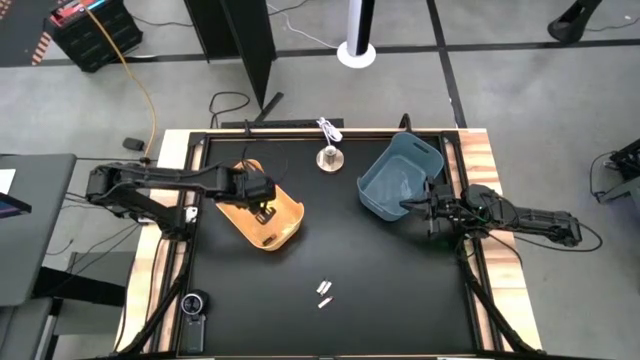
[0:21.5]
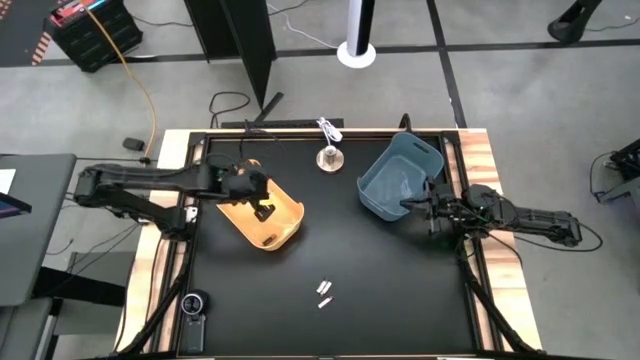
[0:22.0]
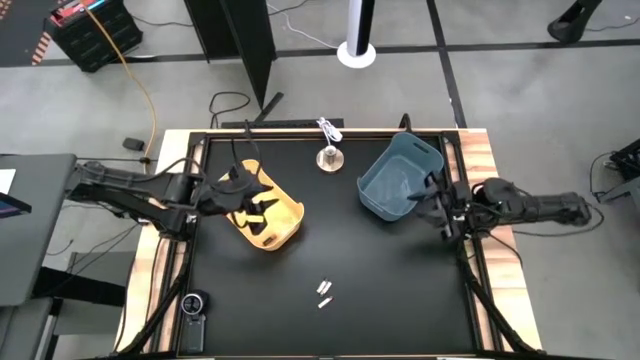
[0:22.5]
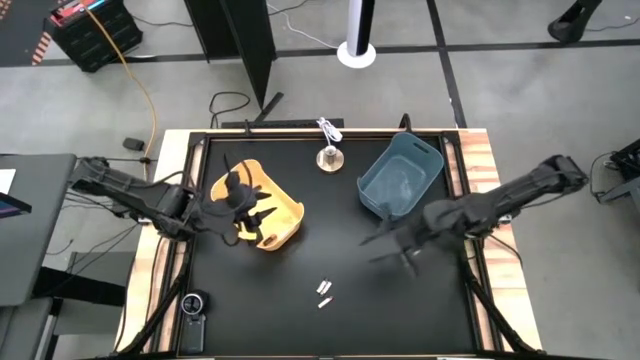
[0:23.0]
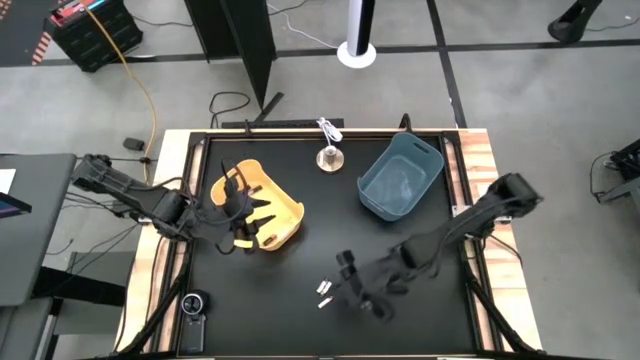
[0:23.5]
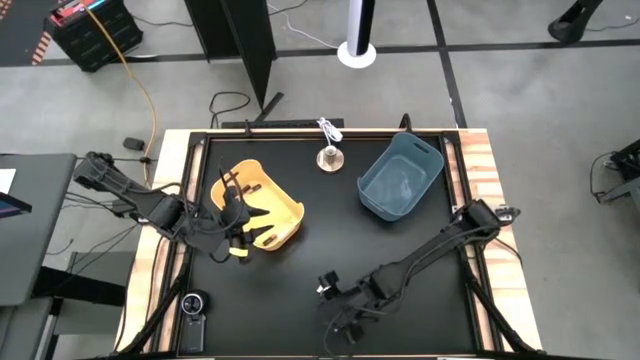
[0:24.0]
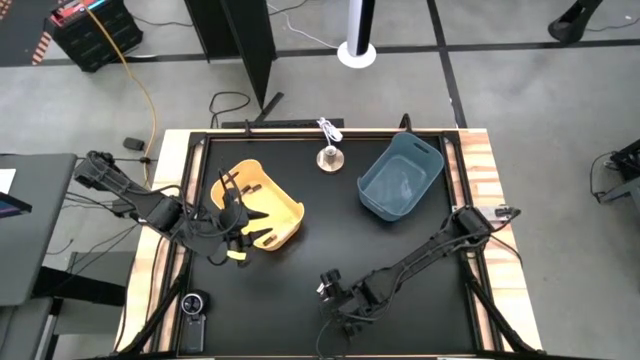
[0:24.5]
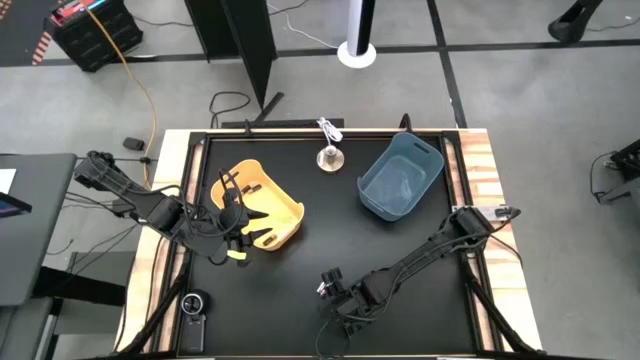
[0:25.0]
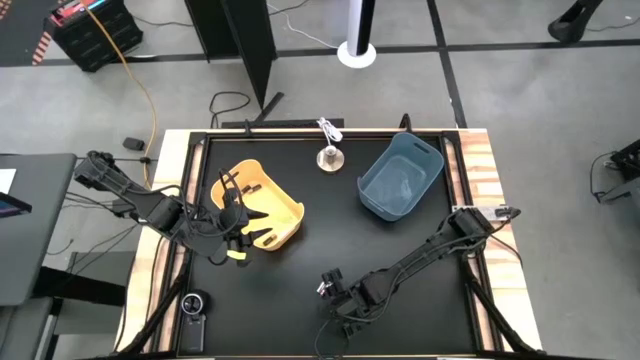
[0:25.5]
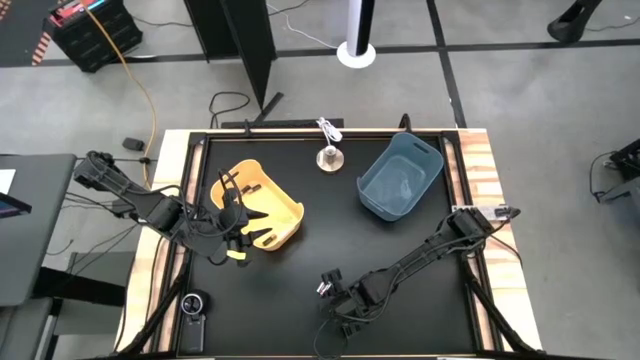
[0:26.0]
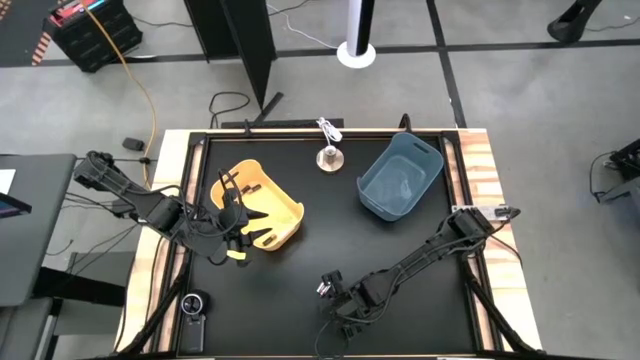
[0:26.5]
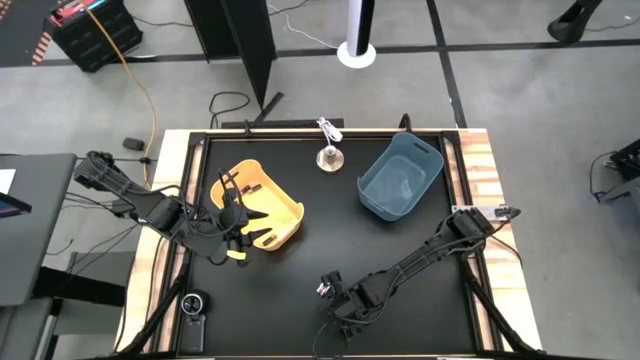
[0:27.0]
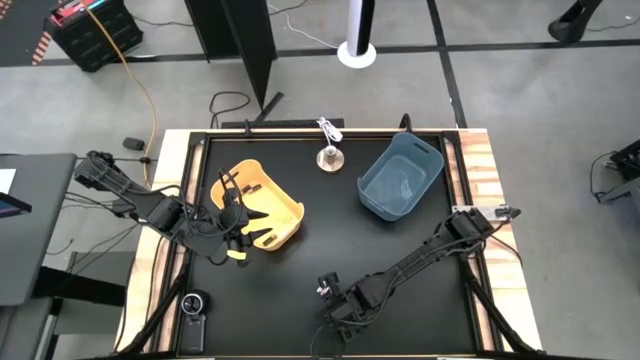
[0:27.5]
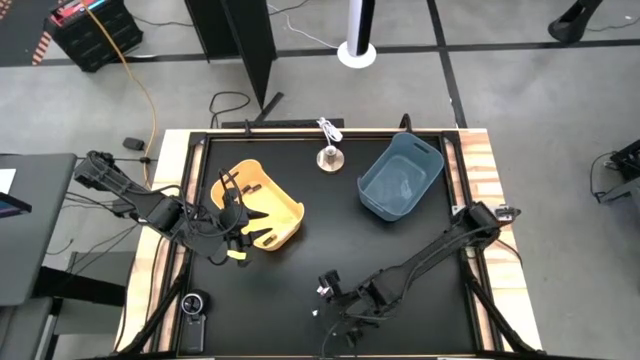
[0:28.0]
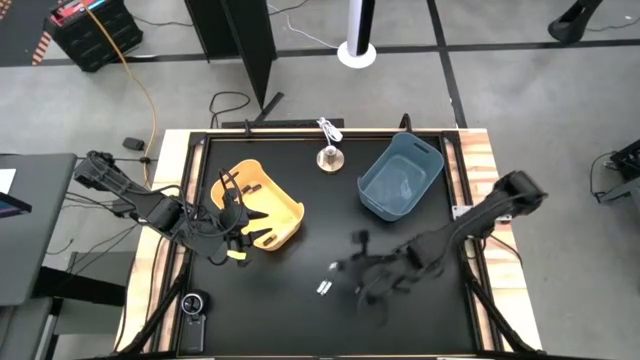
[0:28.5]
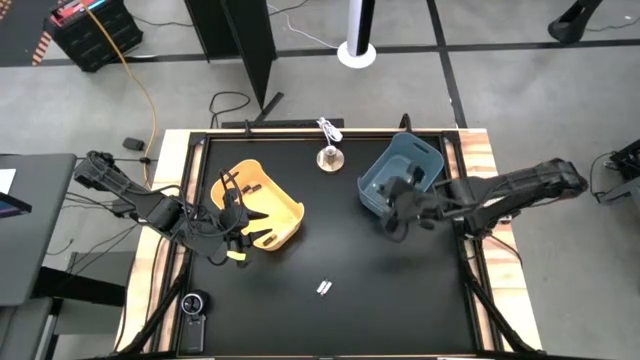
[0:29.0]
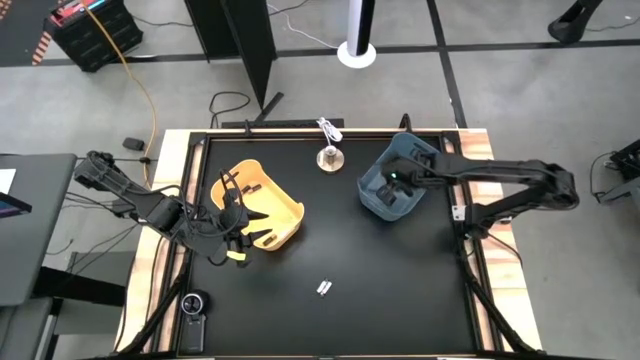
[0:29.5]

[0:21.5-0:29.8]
Task: Sort batteries
Put the silver battery into the blue bin

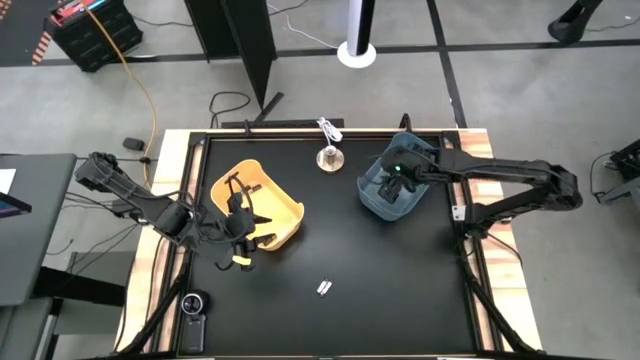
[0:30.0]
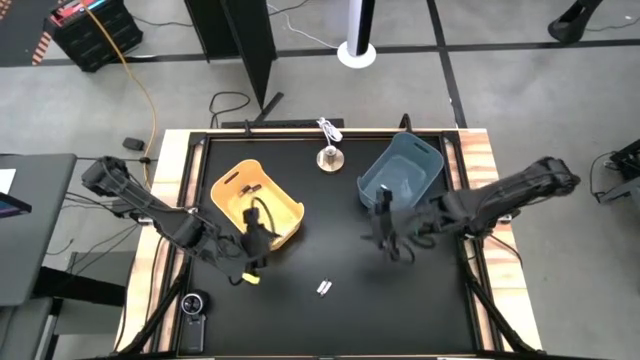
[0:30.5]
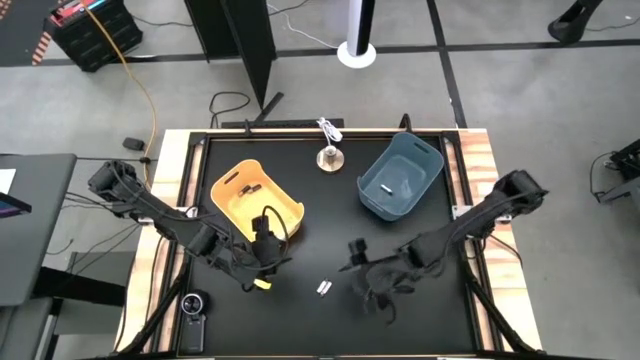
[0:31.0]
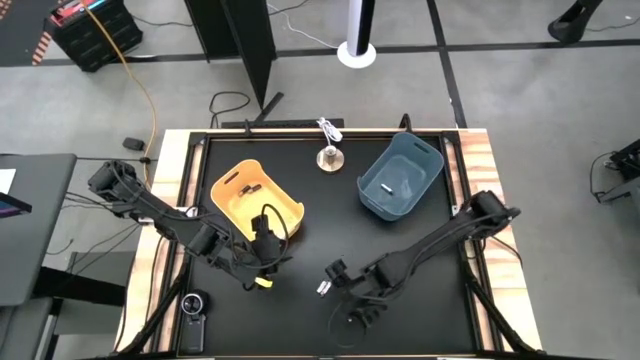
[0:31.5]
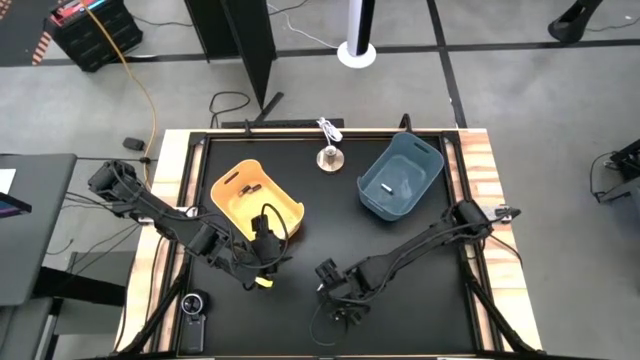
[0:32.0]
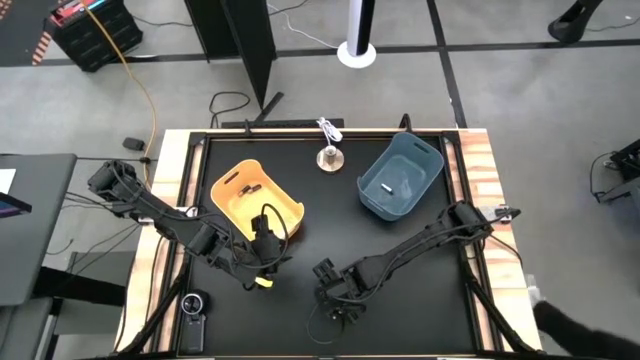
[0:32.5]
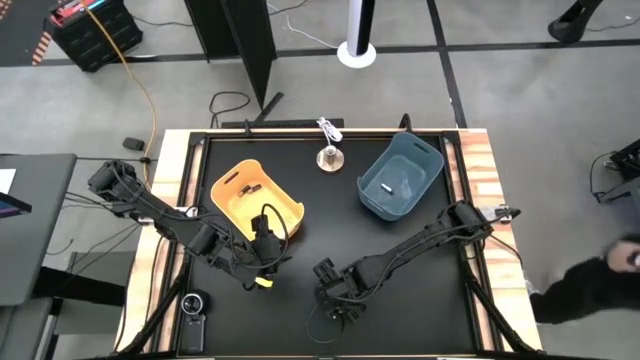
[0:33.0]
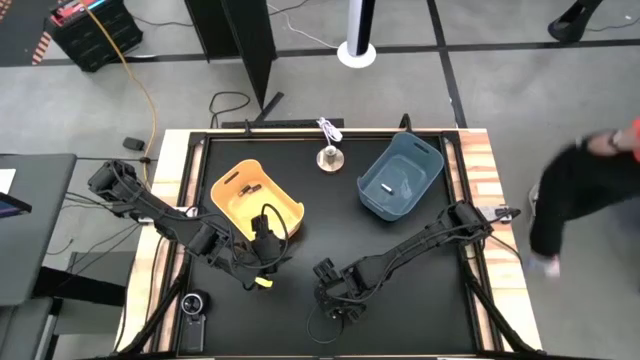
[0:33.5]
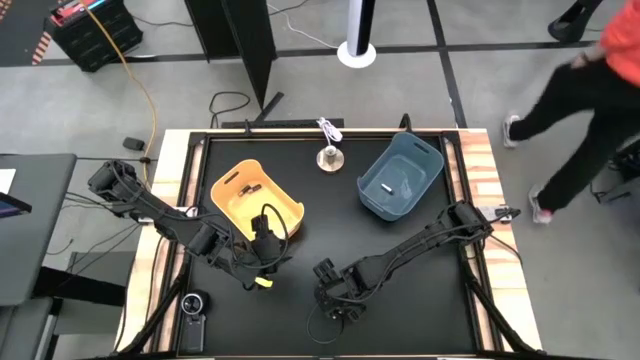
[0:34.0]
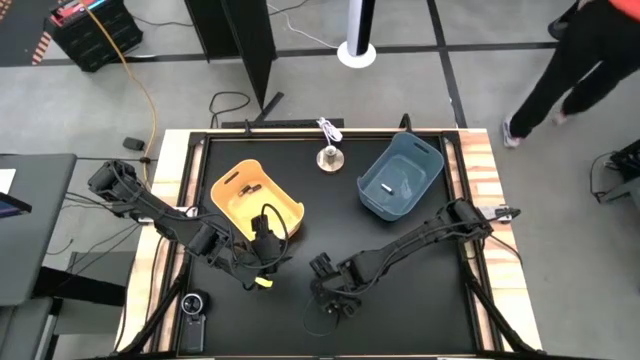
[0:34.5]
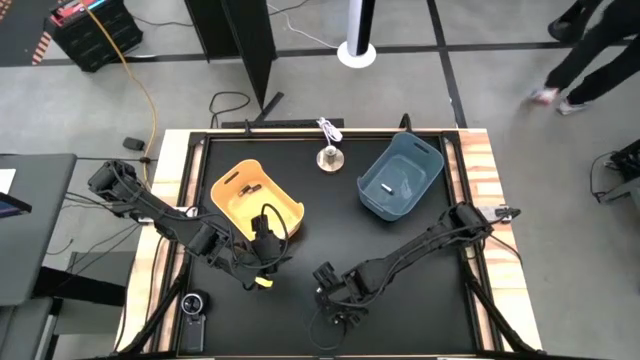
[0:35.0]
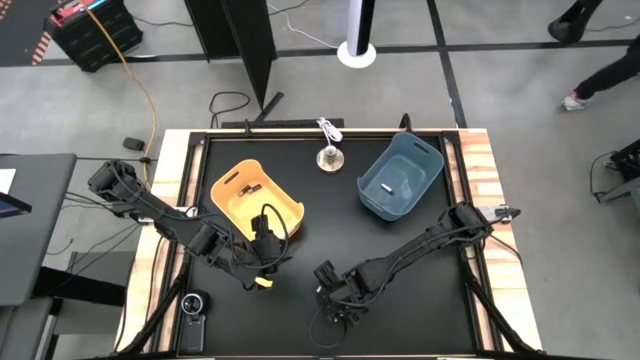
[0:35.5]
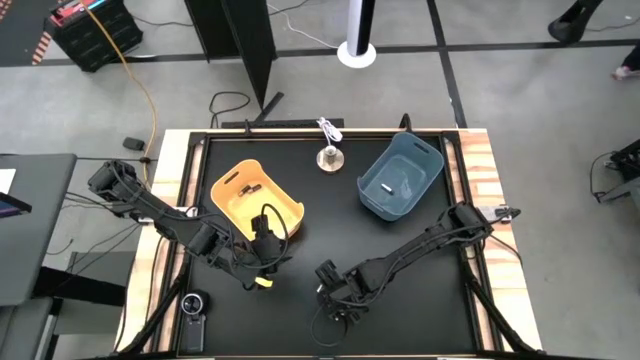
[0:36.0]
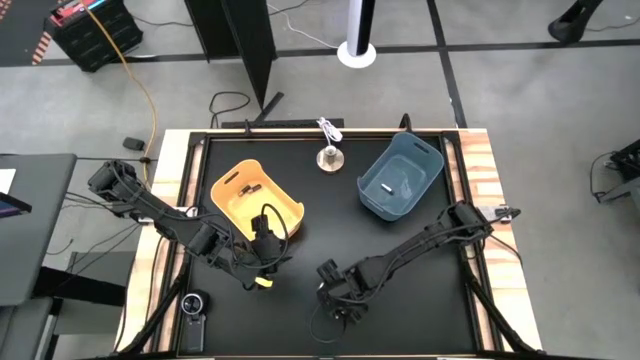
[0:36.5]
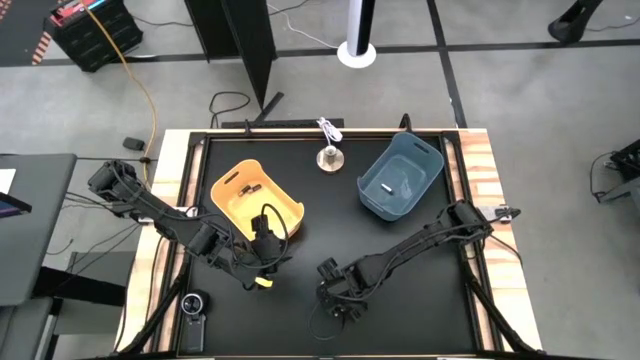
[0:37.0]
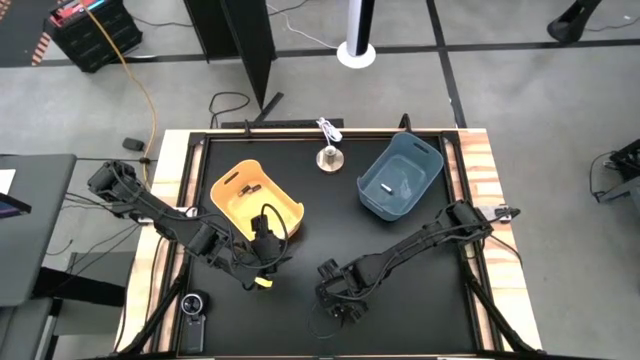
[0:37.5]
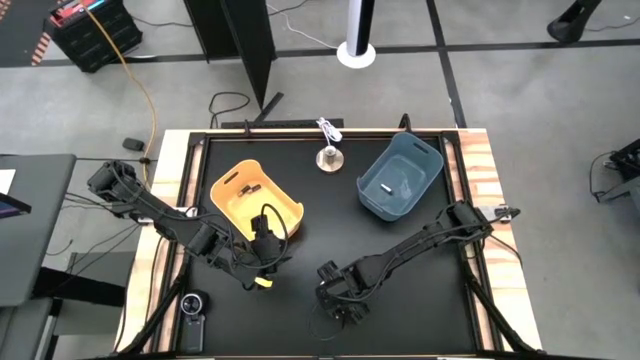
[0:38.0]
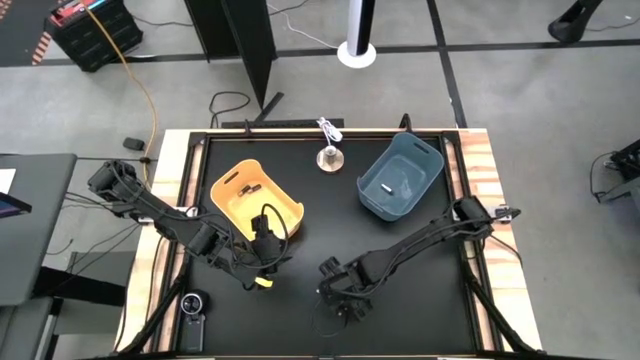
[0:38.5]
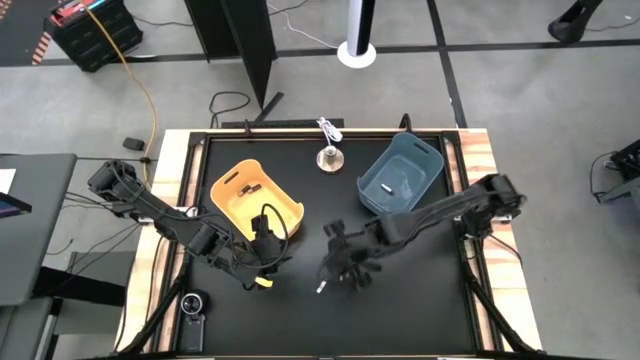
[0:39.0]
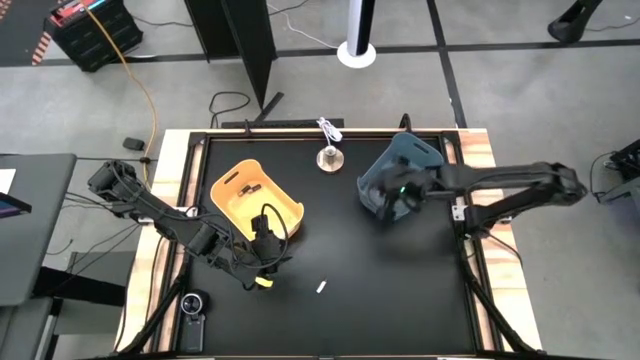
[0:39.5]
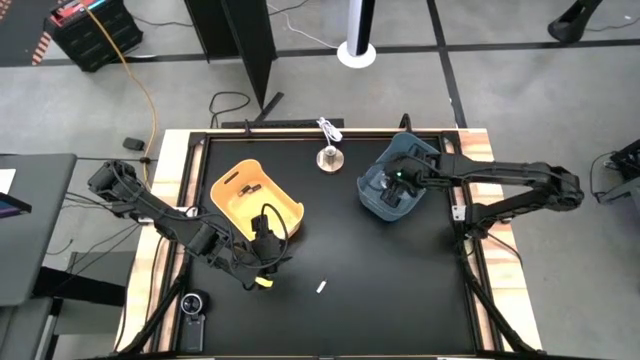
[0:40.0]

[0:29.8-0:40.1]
Put the silver battery into the blue bin

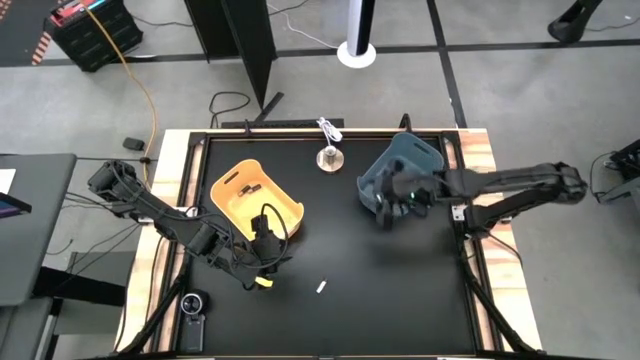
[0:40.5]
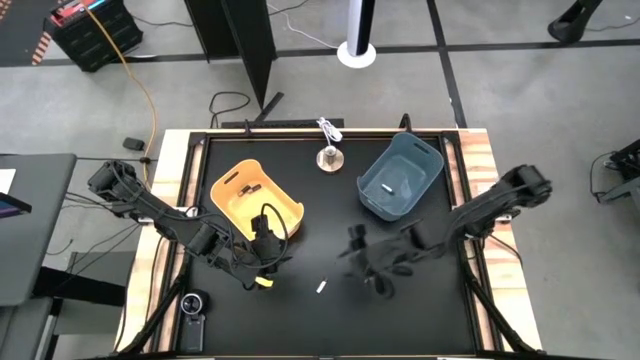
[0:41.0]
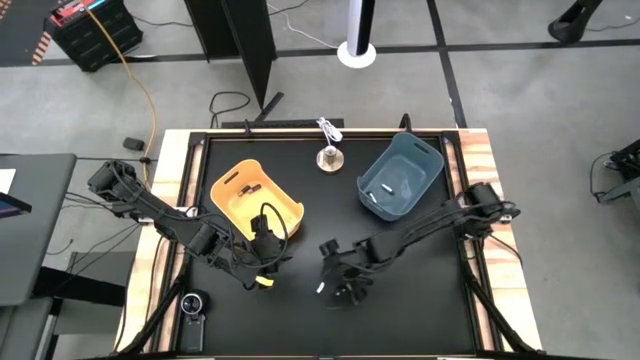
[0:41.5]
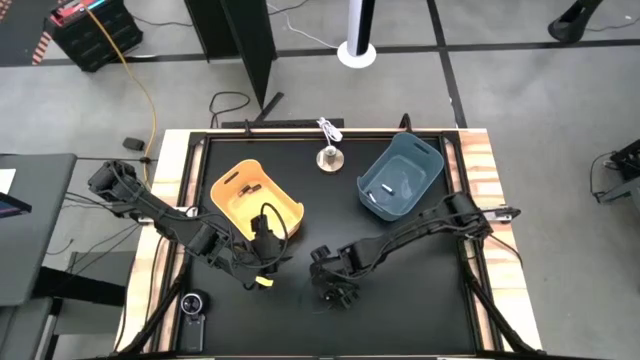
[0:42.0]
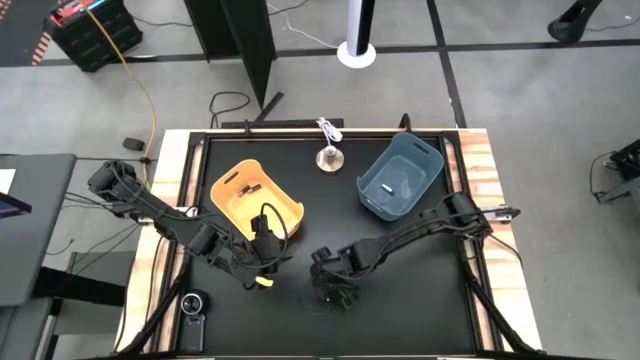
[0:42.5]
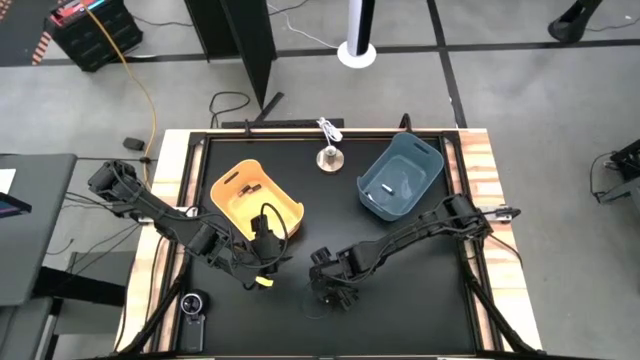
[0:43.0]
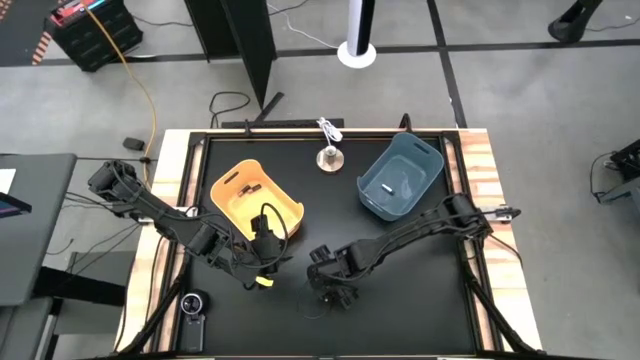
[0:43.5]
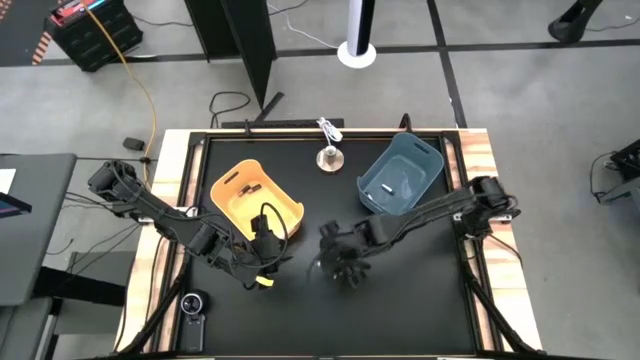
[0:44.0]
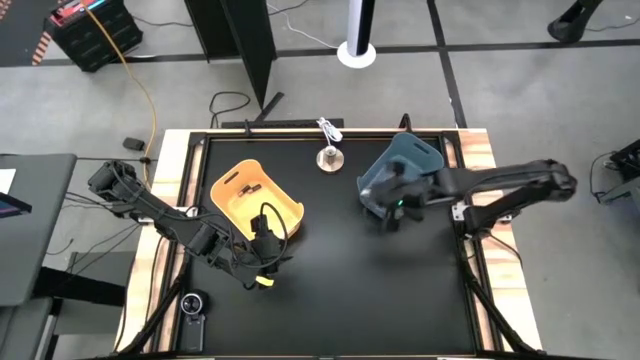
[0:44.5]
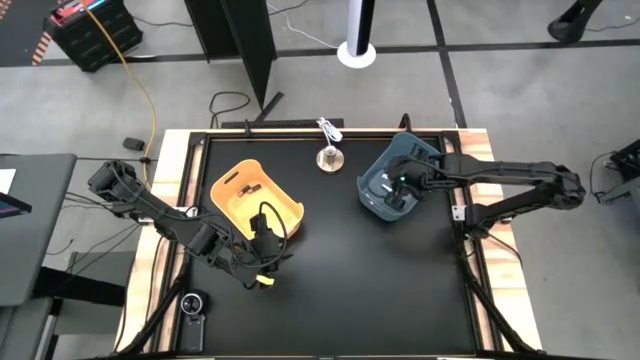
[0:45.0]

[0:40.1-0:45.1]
Put the silver battery into the blue bin
